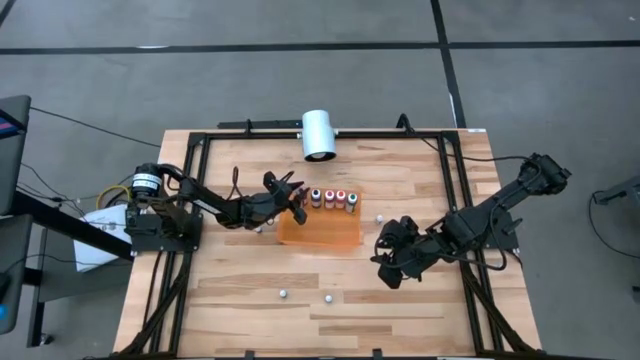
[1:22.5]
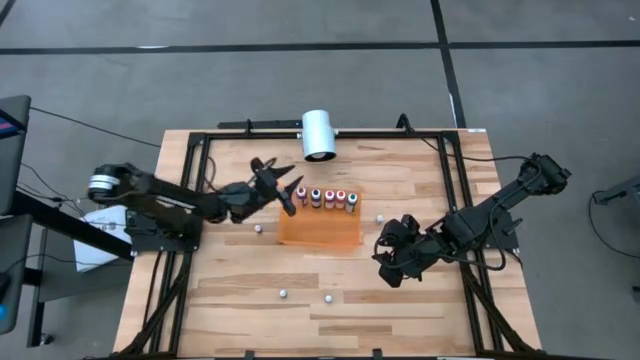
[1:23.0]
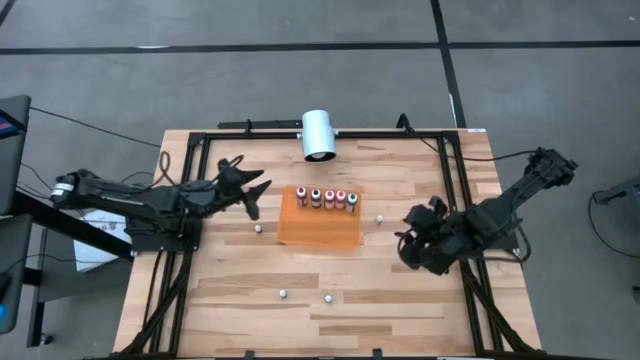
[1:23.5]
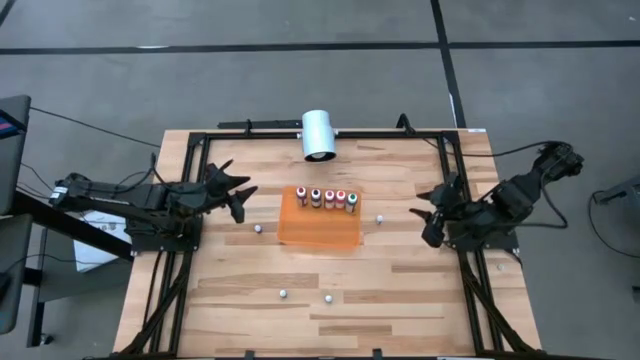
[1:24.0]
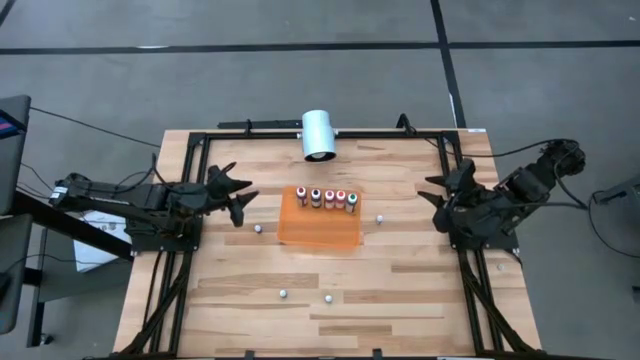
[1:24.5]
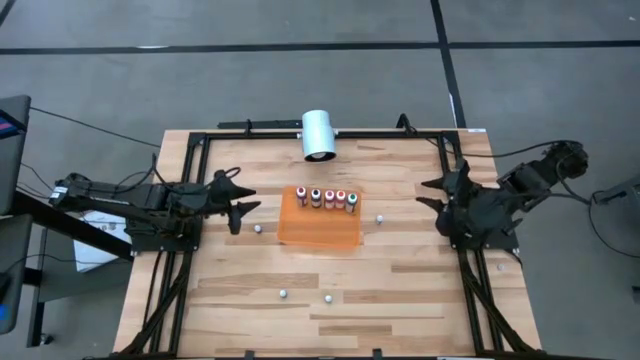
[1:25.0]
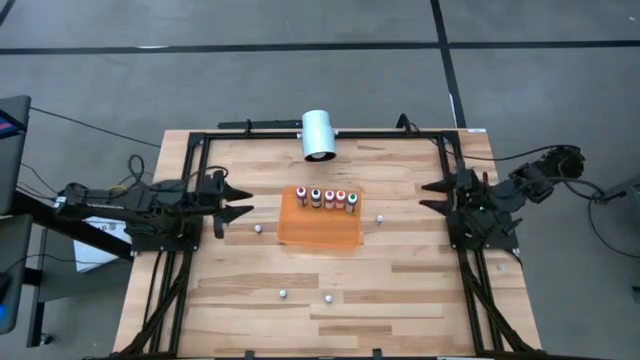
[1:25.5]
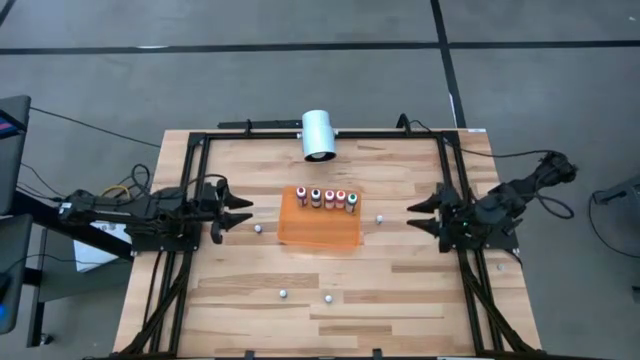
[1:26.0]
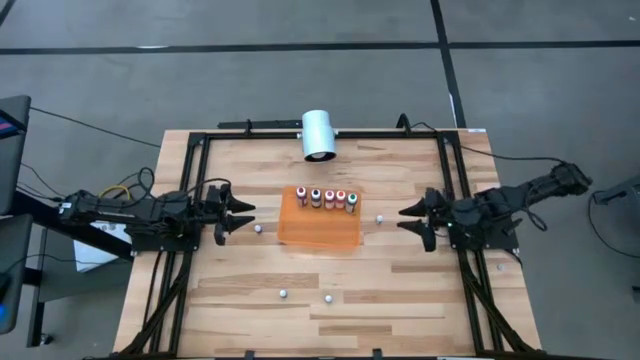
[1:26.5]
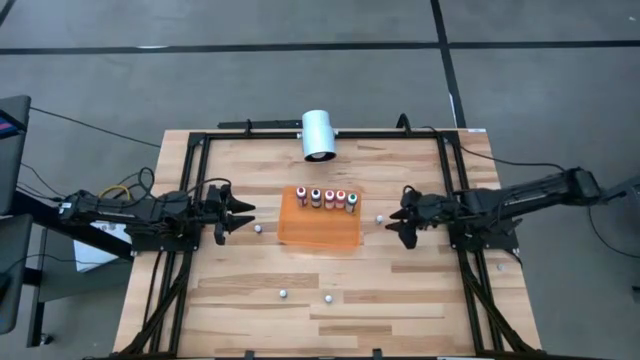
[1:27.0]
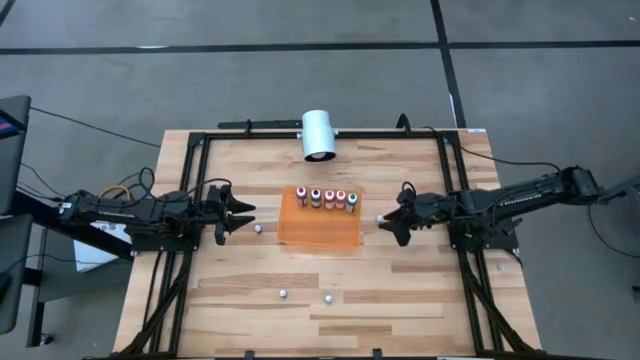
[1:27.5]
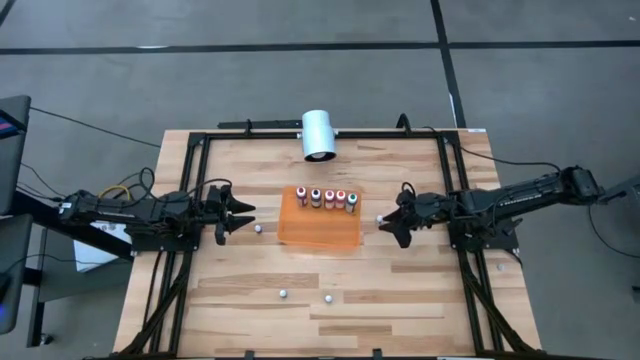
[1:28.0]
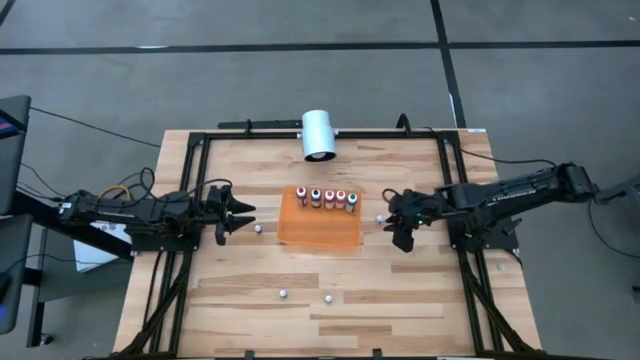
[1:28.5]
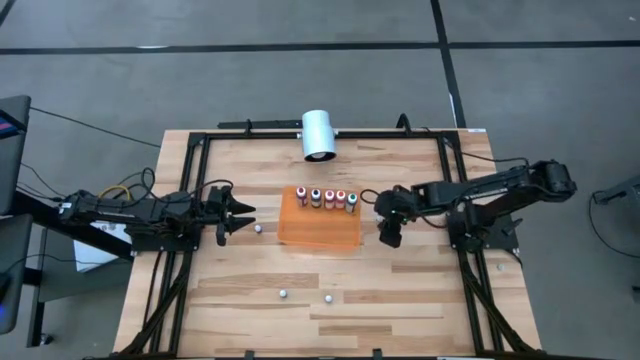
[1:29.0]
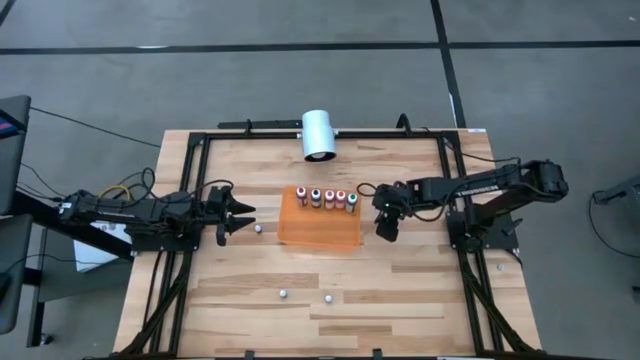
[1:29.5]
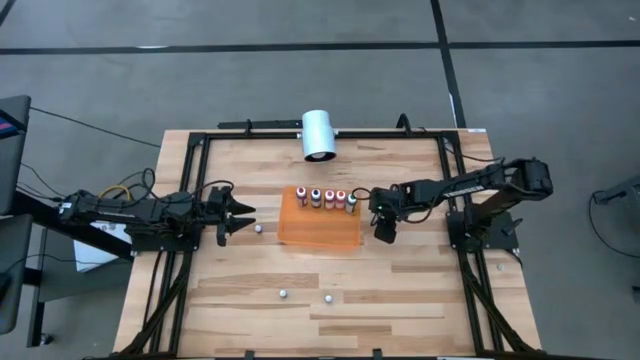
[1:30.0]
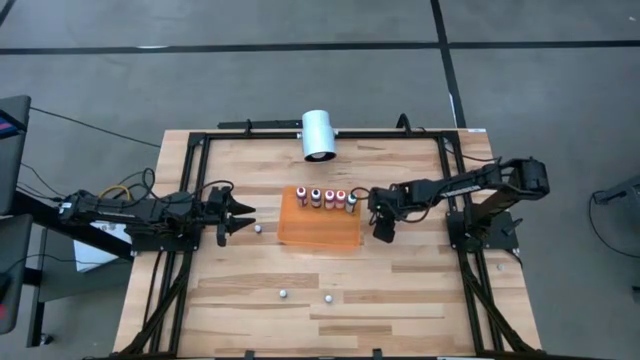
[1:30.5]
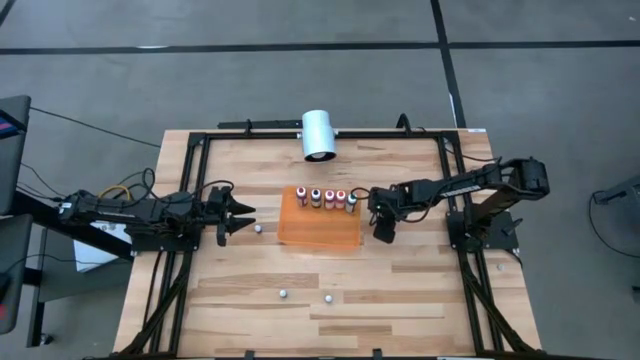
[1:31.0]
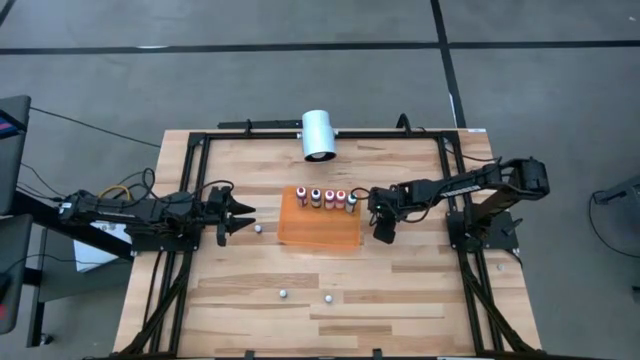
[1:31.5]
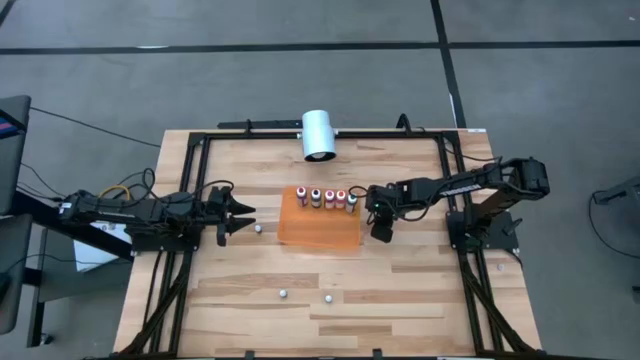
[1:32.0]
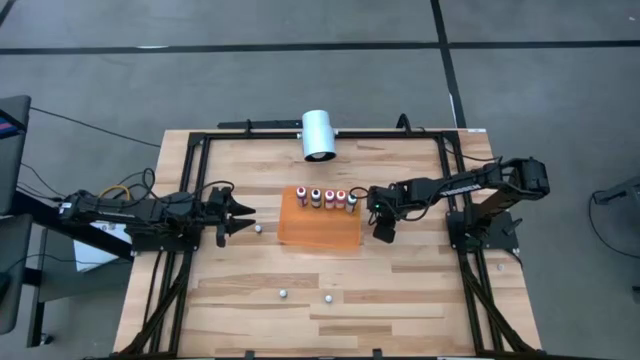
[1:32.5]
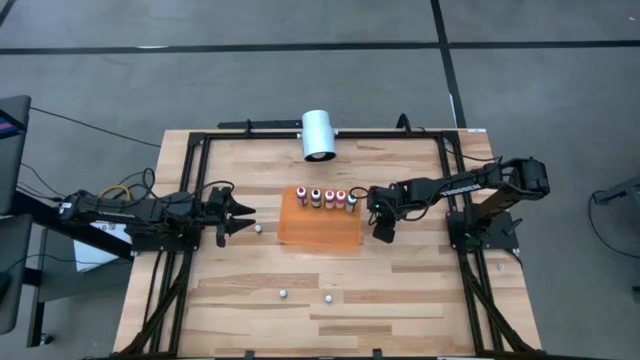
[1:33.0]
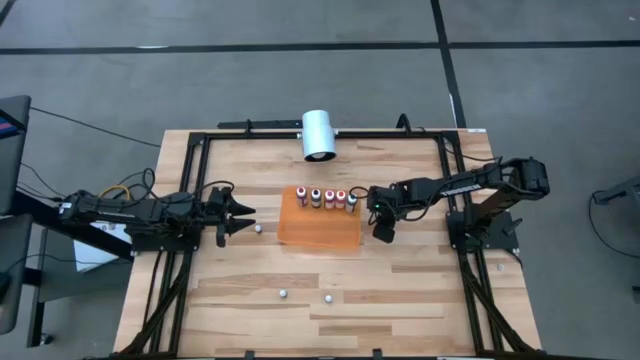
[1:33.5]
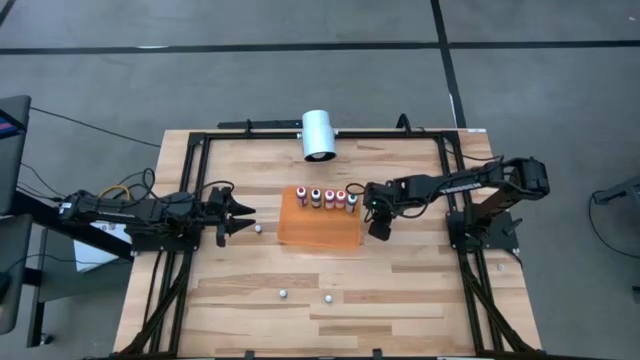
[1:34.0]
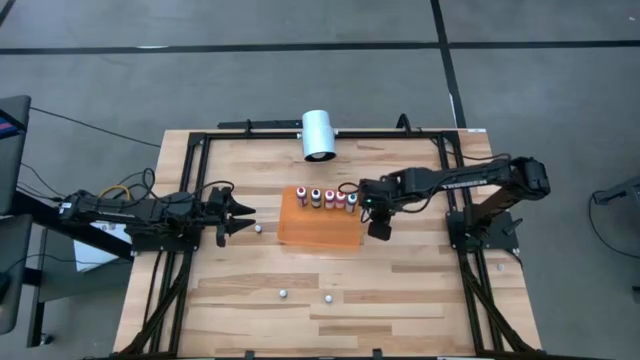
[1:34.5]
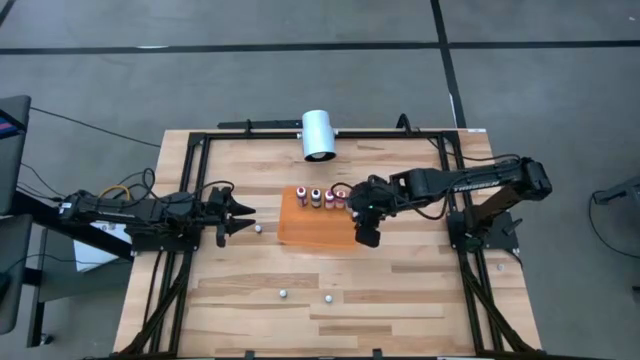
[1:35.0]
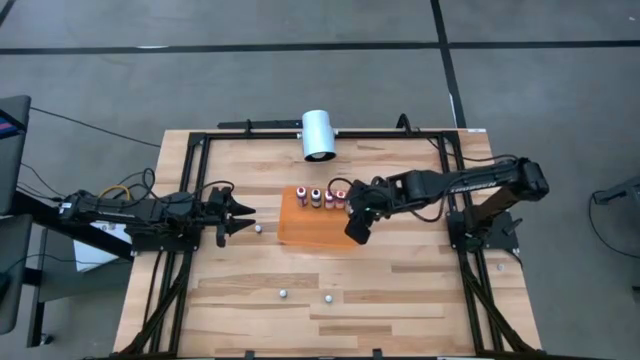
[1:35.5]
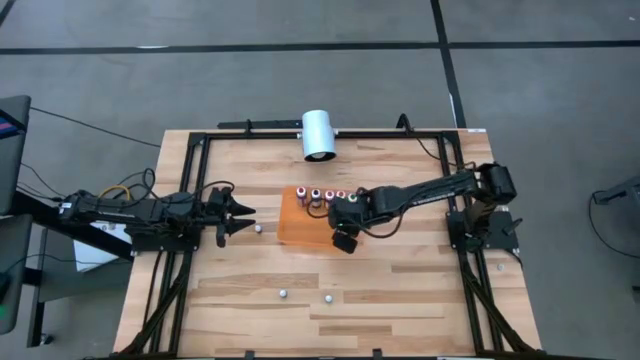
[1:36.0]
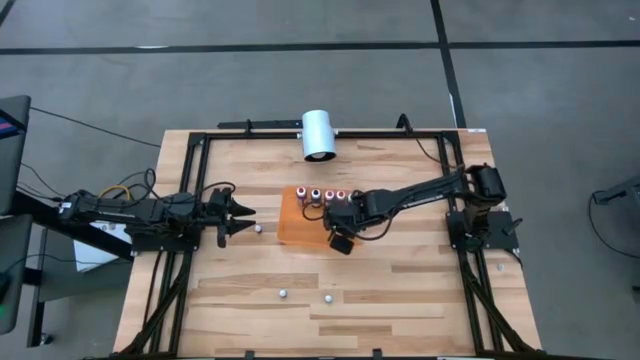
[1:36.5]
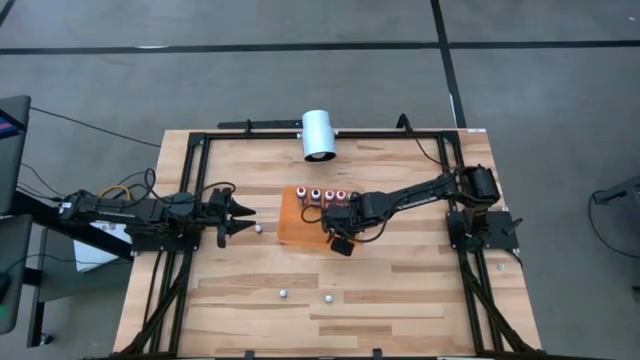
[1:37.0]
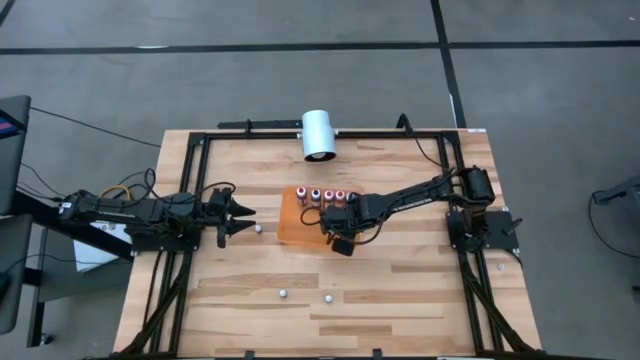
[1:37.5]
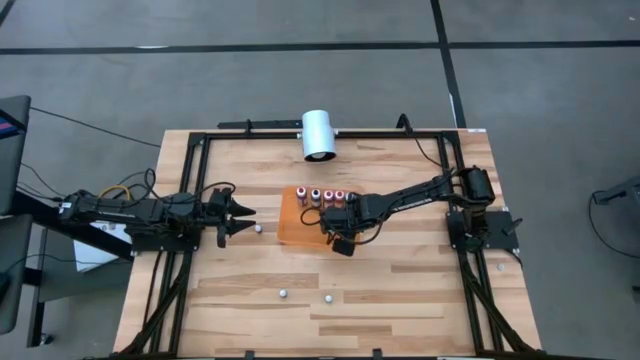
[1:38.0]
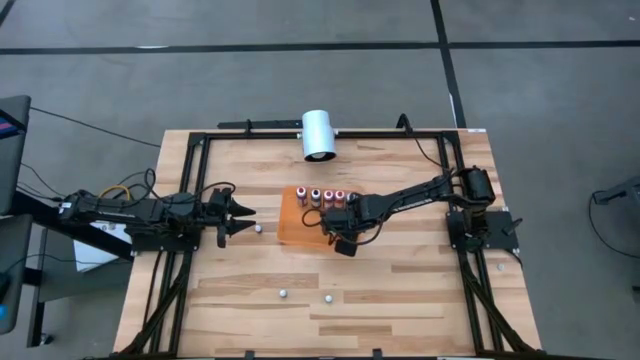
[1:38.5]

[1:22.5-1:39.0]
Task: Pick & Place food coloring
Put the top small green food coloring bottle into the orange bin

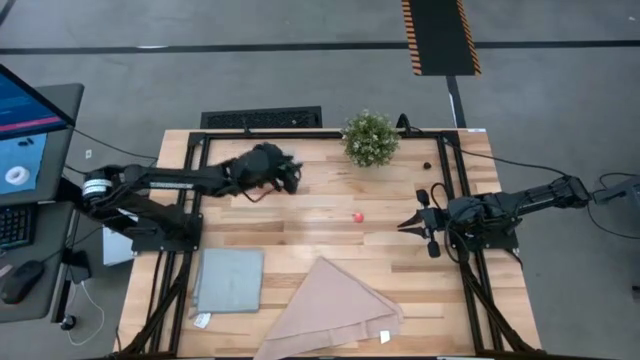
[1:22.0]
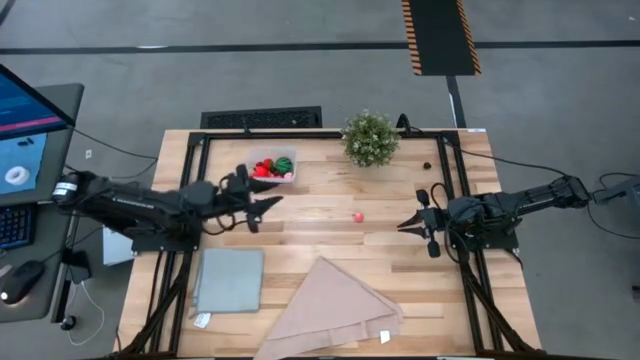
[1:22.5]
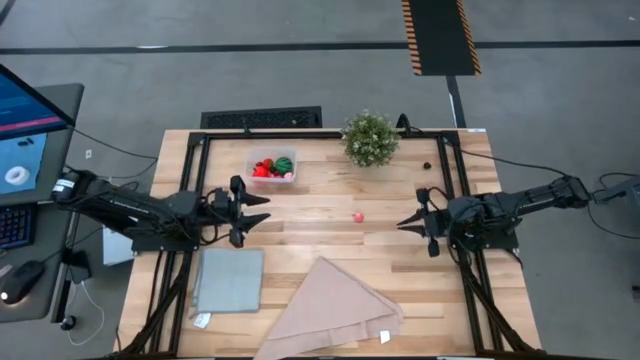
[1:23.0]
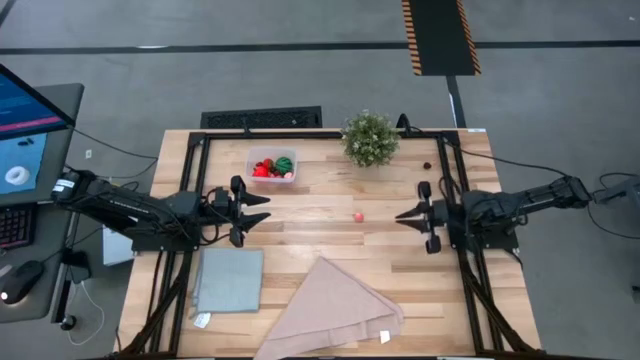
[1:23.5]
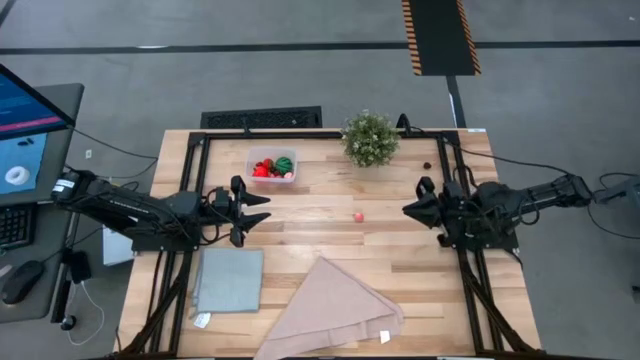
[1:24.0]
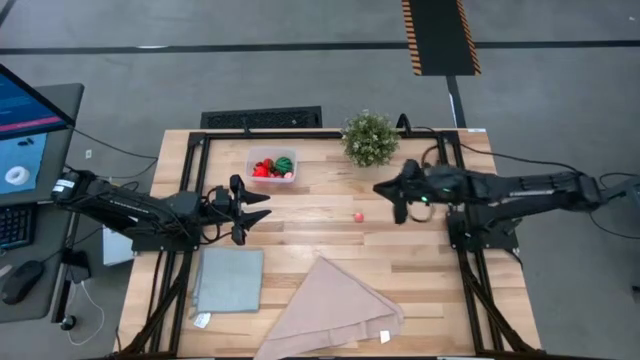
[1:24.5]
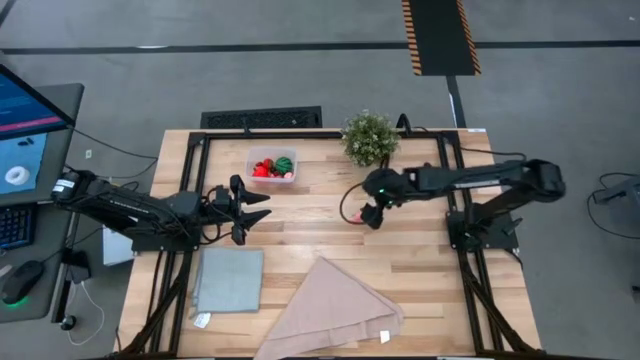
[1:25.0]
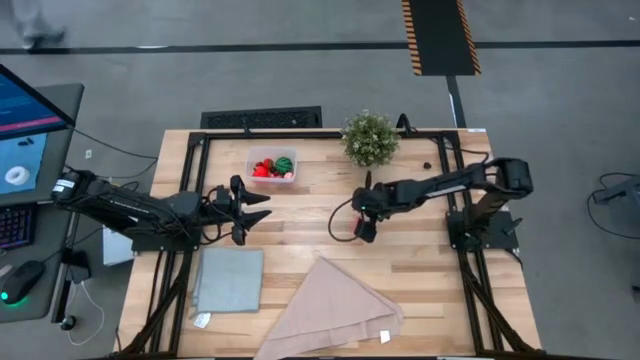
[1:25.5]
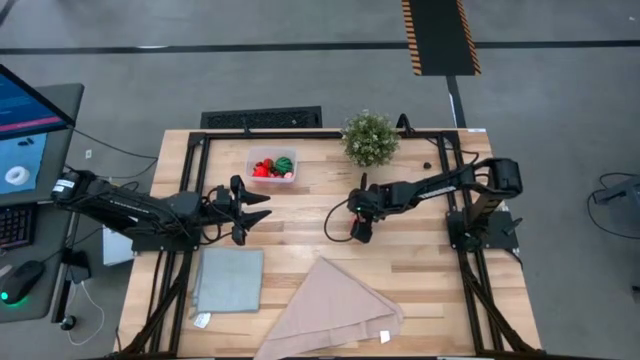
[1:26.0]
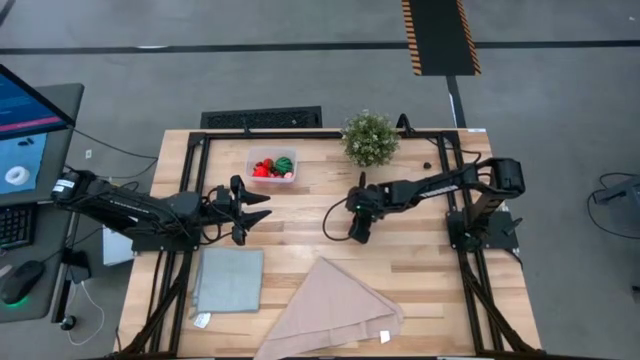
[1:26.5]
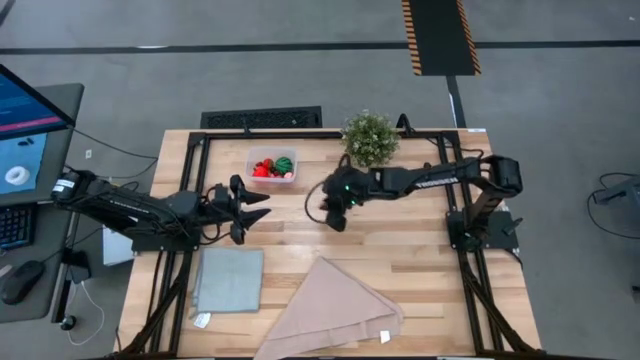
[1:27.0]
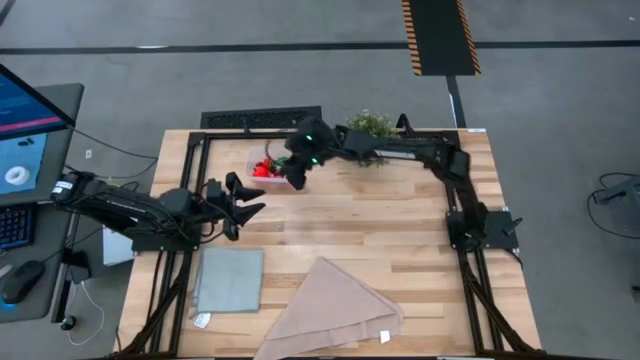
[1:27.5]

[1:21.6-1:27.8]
Task: Pick and placing Produce into tupperware
Put the pink peach into the transparent container
